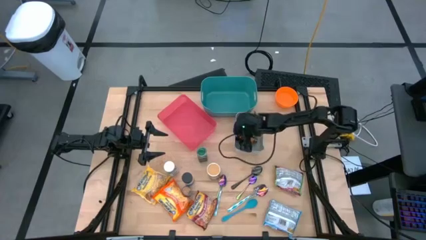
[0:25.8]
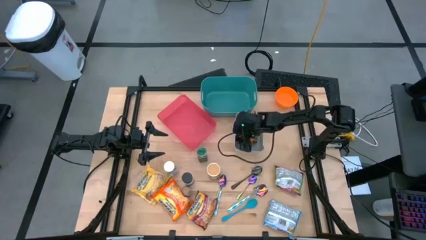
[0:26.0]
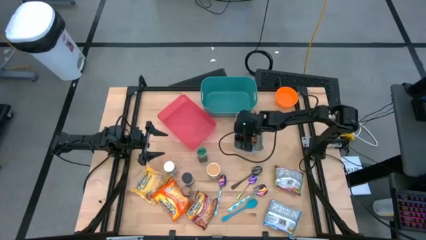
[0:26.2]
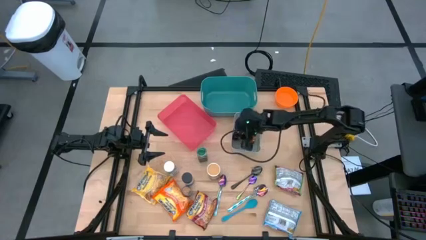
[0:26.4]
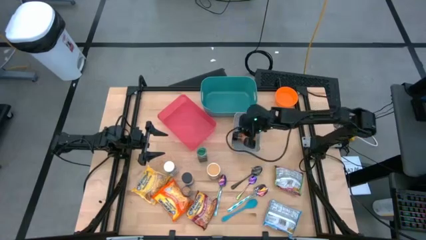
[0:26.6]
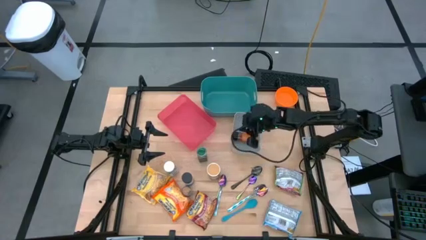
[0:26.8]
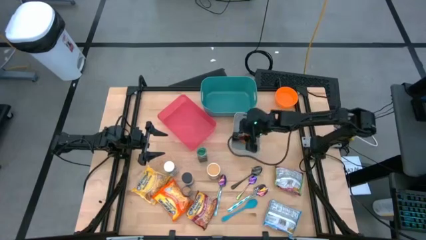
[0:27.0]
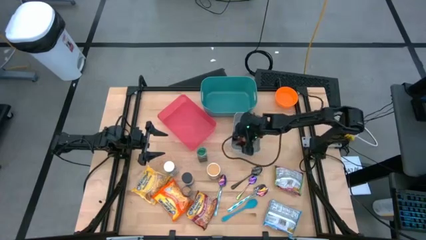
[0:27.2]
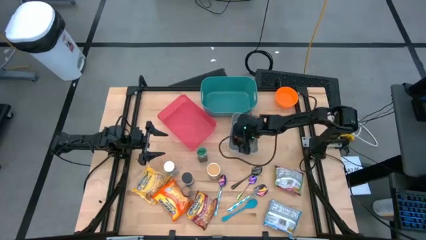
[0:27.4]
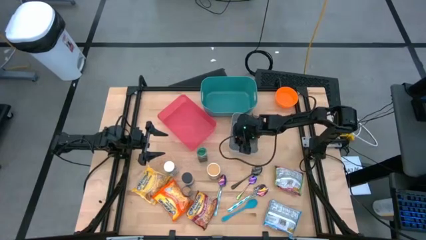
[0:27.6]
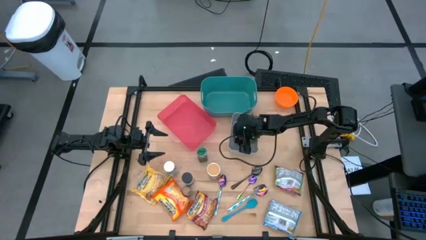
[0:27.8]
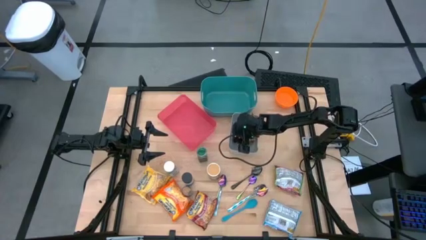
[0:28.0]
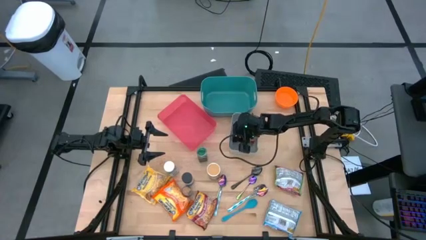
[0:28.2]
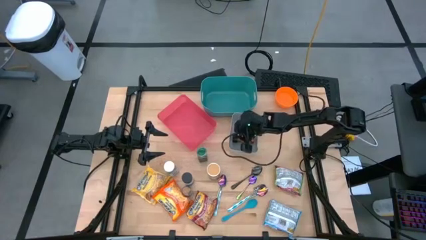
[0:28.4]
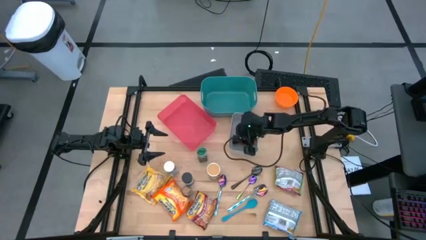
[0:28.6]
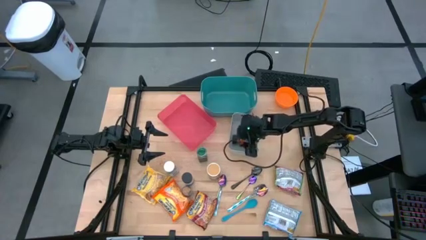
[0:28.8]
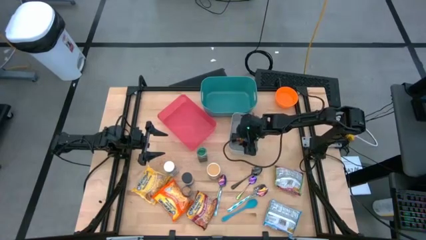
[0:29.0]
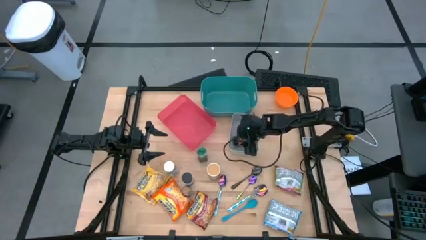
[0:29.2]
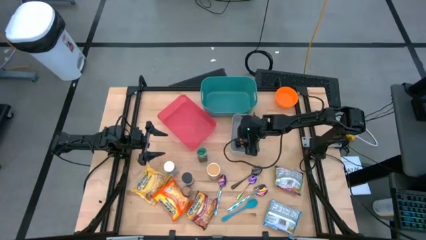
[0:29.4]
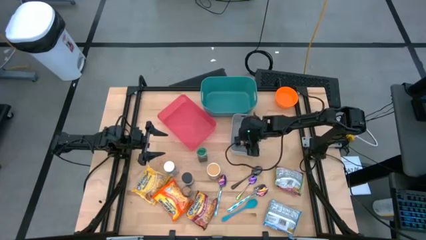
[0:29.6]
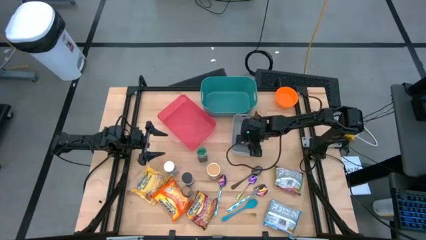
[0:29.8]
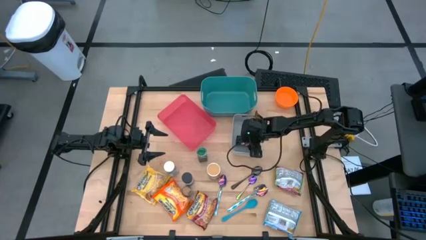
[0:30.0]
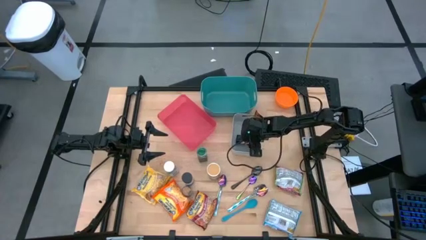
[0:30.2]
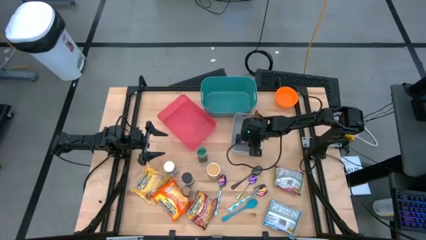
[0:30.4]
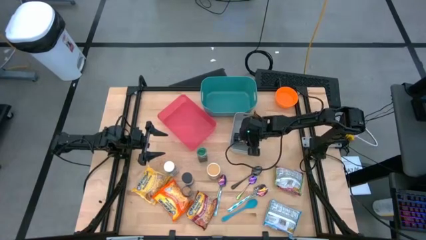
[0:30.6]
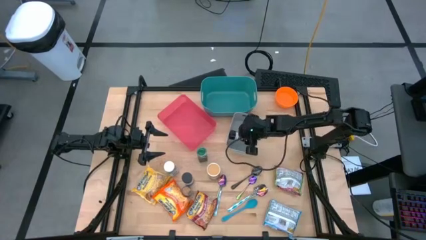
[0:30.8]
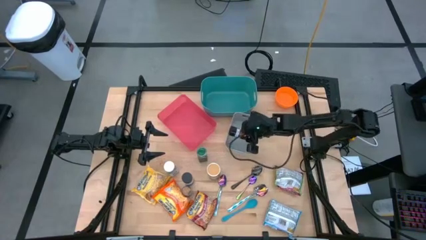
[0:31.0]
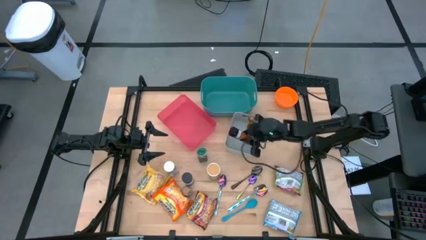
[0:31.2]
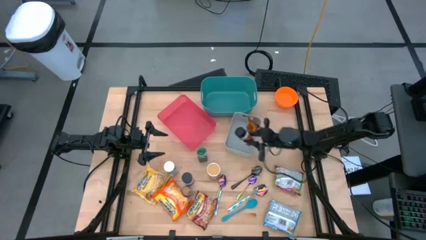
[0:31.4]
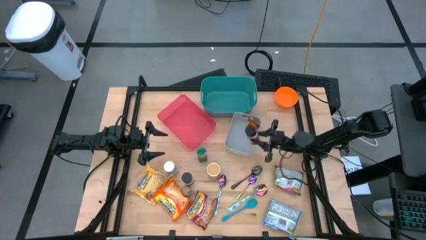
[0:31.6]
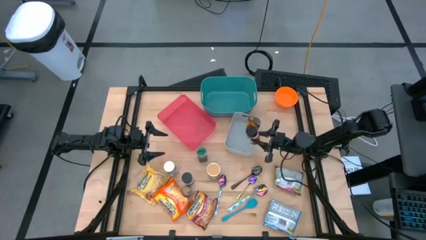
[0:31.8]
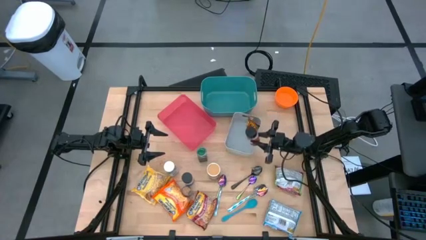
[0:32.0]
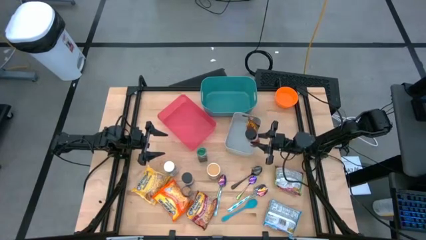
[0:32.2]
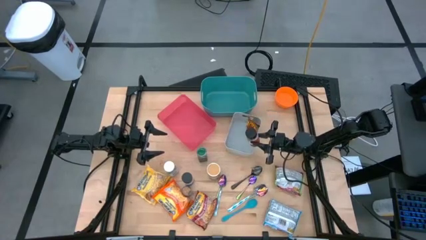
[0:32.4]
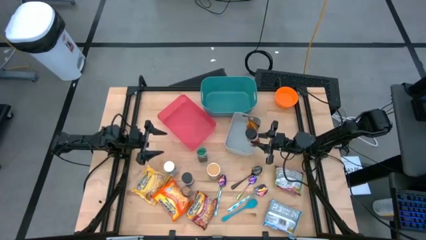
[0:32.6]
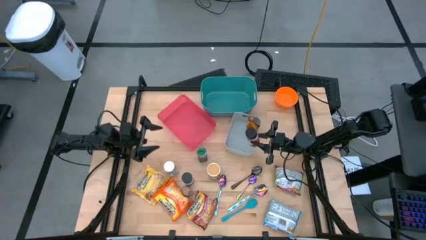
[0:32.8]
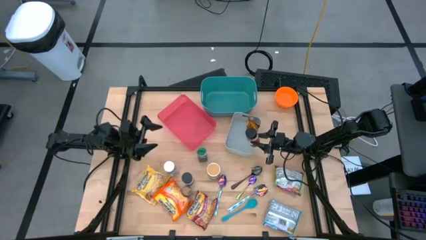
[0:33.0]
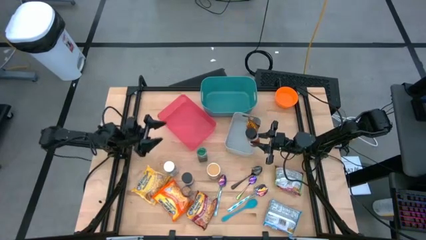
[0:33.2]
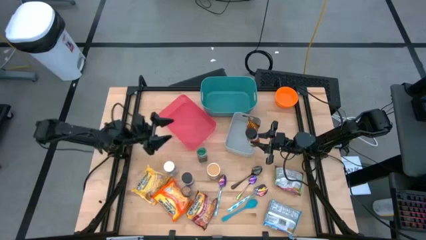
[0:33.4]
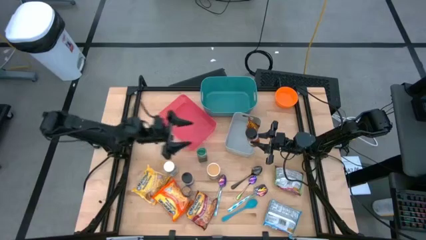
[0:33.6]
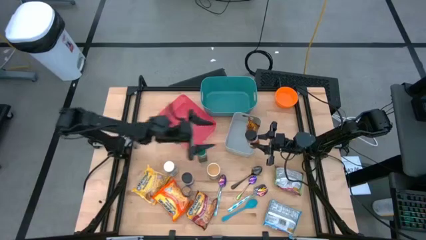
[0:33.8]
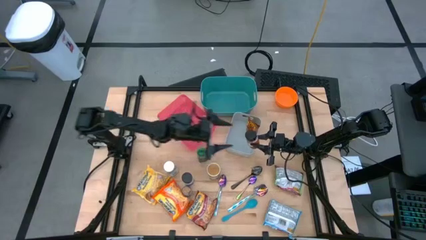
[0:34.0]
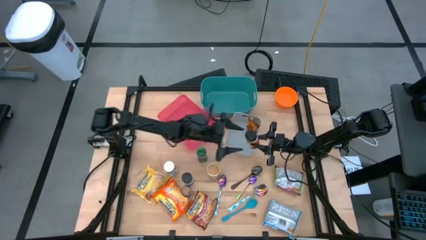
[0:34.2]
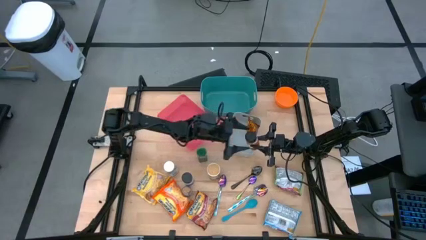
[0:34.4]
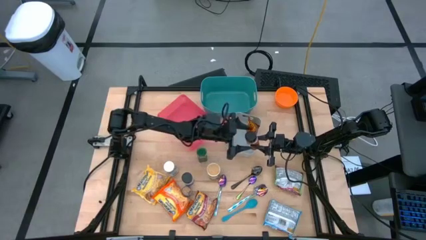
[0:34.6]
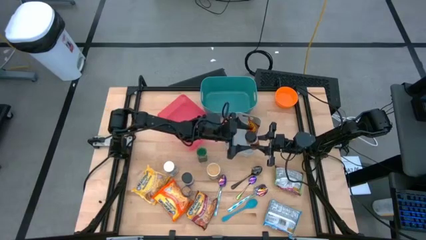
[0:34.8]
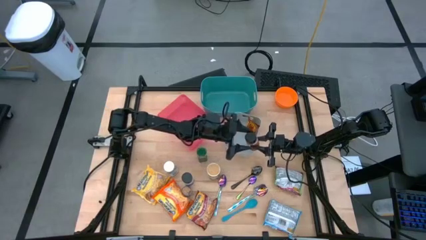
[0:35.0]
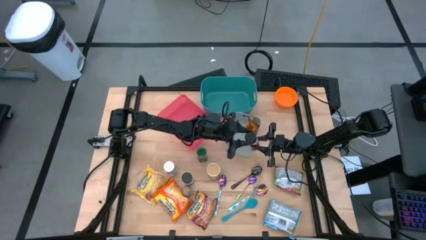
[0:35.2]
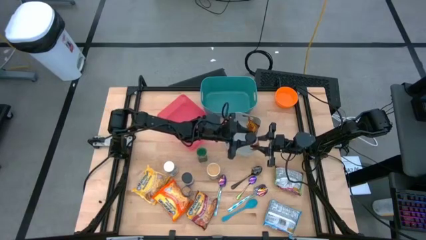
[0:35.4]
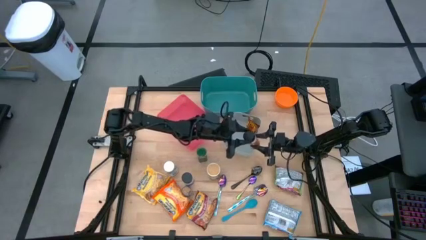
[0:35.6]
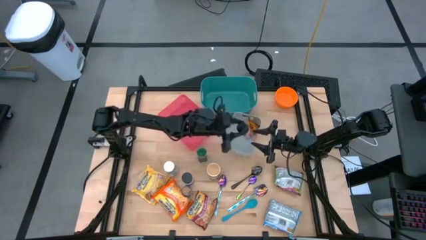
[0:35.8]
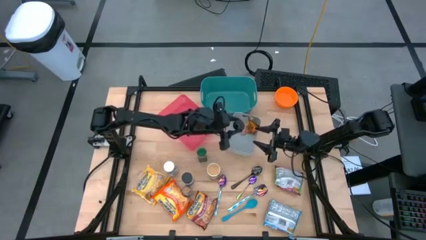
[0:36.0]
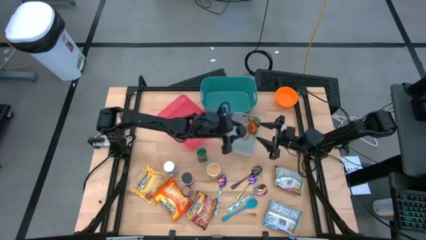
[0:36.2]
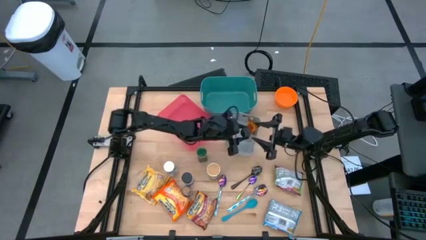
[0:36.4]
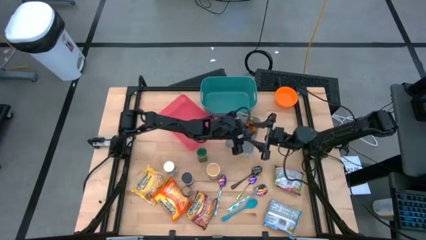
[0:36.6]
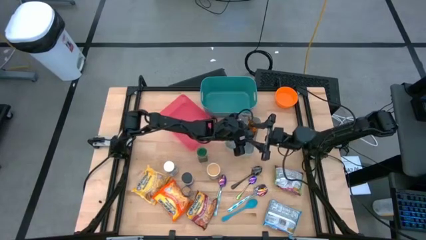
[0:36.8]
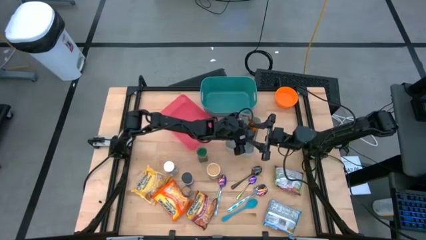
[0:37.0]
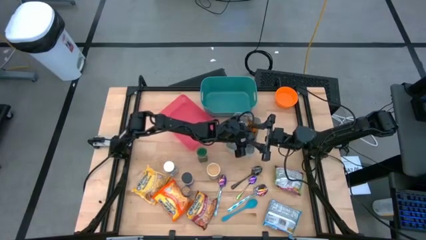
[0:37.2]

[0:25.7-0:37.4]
Task: Pick & Place Food Item
Put the orange spice bottle into the gray bin

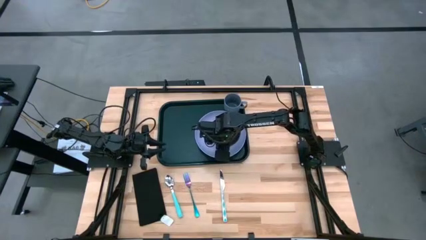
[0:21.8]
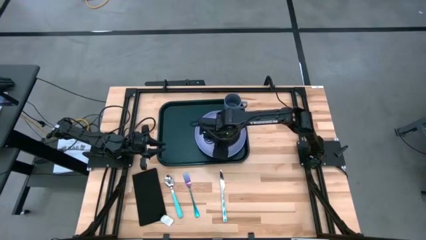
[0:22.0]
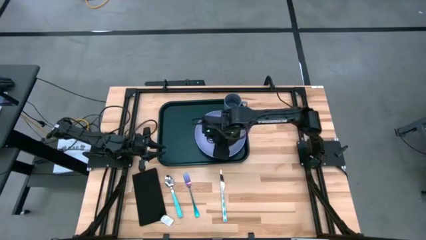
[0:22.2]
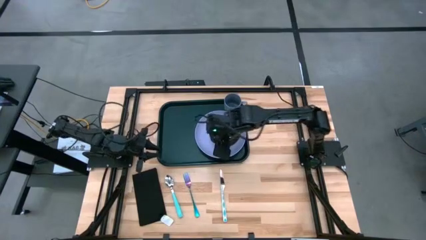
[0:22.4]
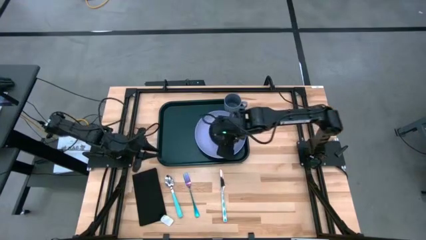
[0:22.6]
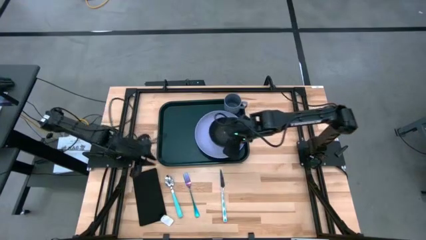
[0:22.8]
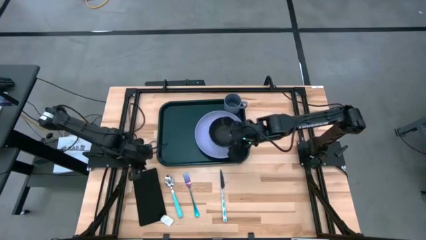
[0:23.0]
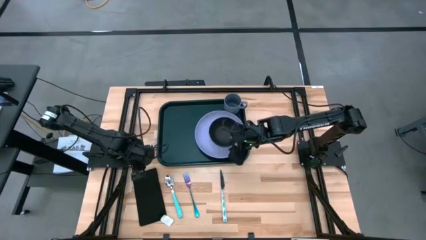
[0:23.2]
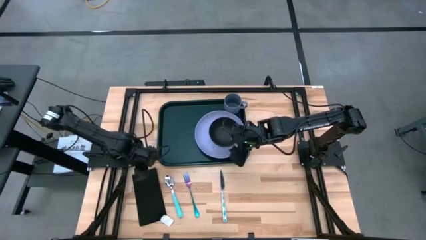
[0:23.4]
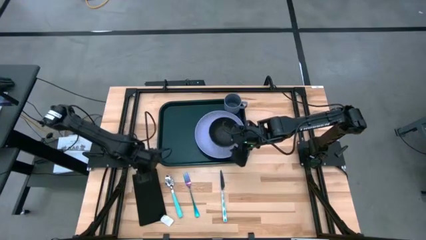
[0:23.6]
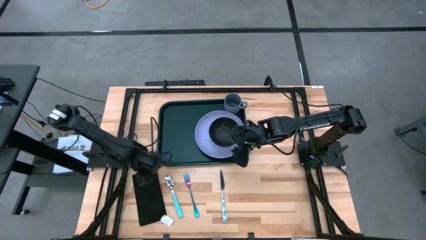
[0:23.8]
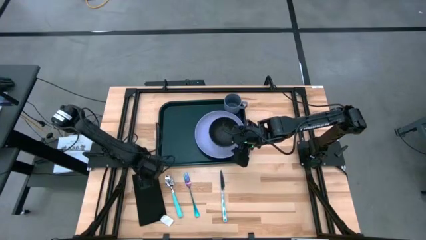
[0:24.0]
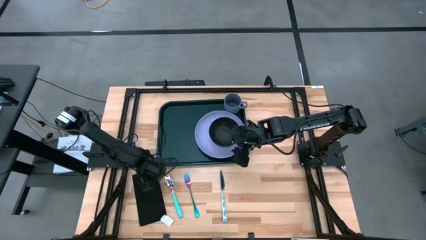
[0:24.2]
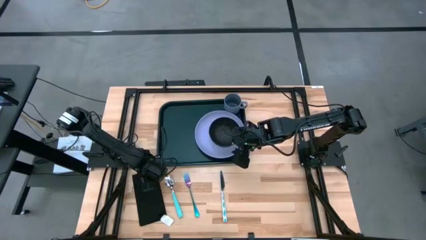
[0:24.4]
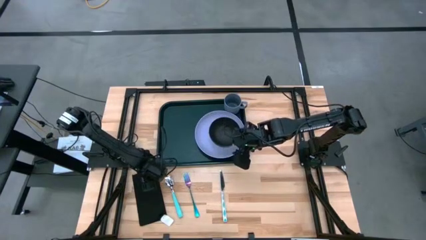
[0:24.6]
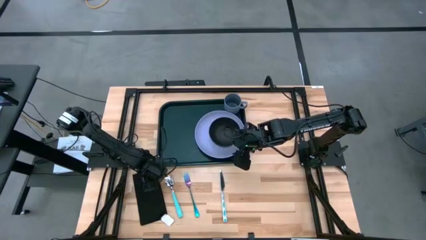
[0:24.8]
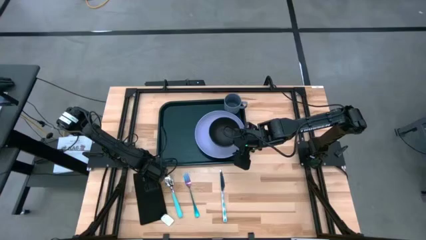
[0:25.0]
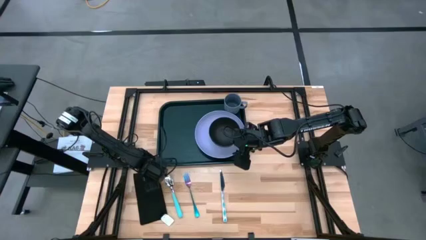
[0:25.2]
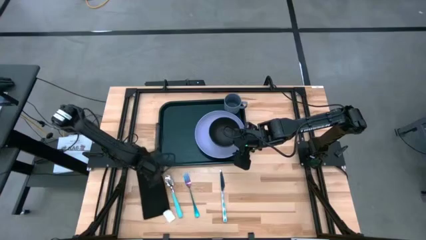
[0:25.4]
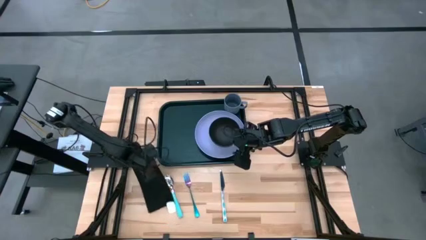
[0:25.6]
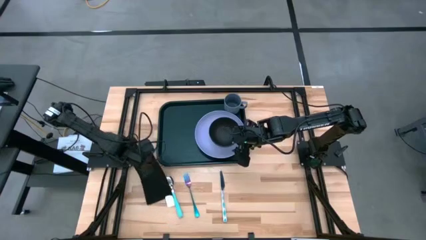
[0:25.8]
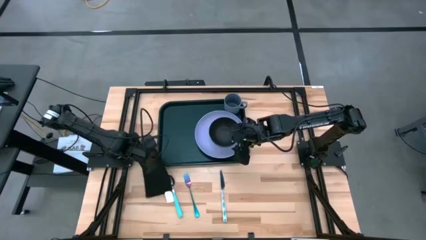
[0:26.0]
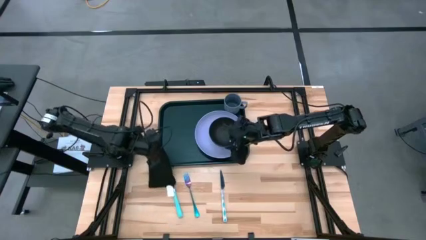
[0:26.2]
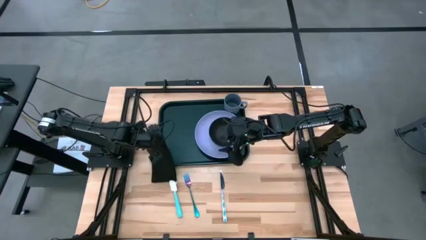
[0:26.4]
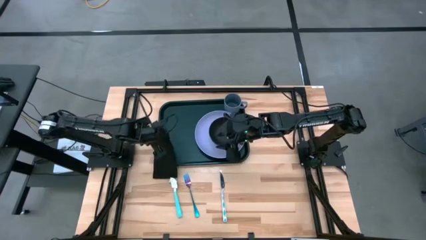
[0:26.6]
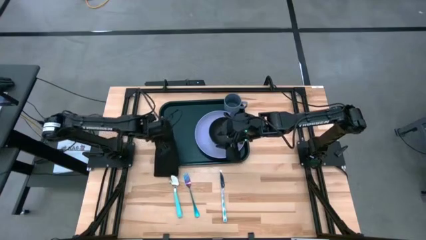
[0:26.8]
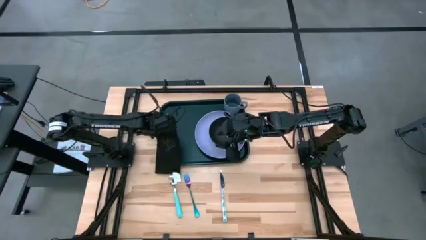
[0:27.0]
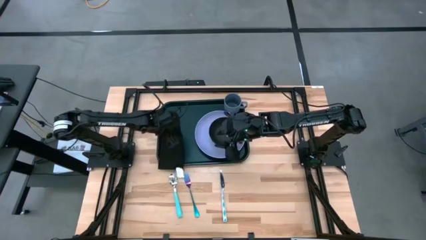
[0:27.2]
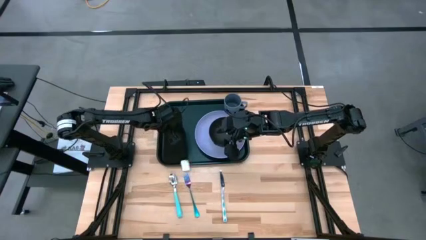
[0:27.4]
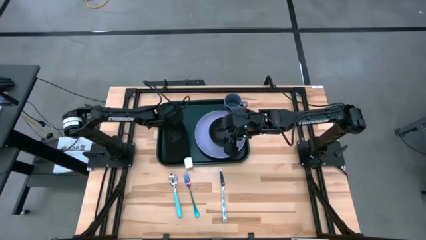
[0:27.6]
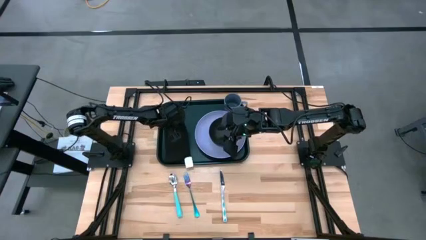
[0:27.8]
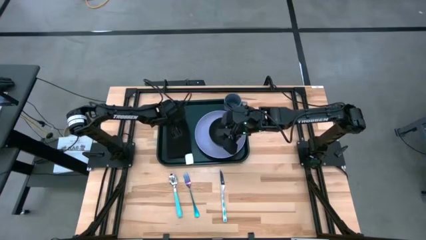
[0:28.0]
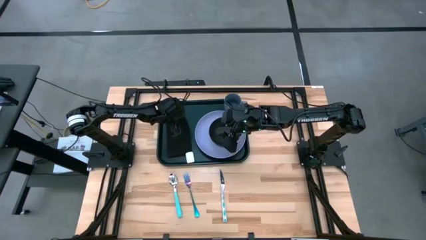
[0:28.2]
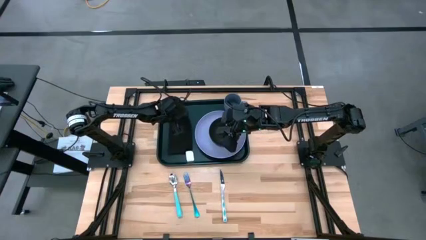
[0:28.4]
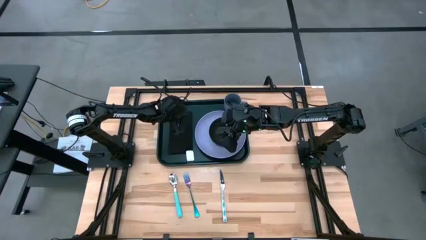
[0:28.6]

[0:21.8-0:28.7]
Task: Set up tray
Put the black napkin on the black serving tray to the left of the purple plate
